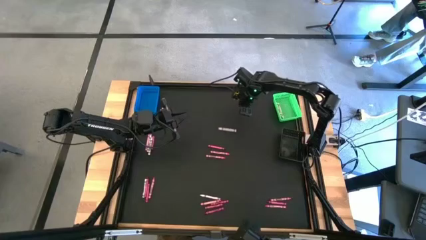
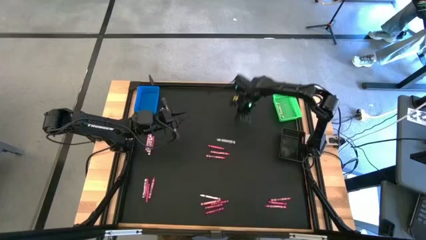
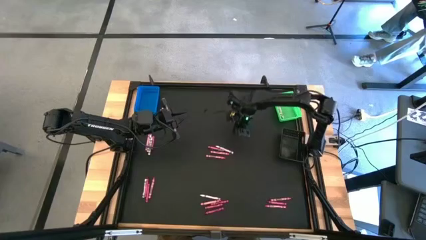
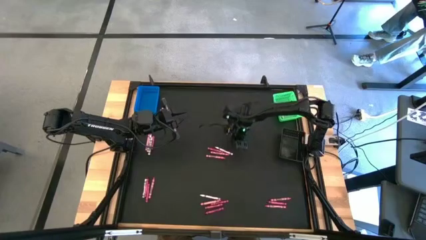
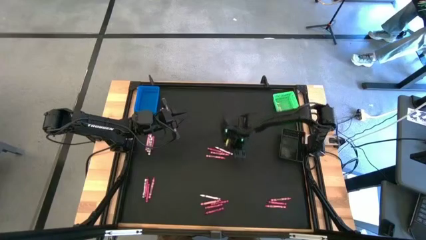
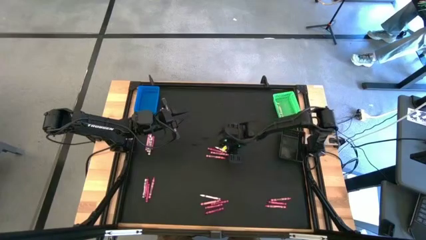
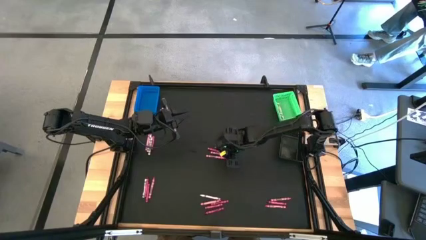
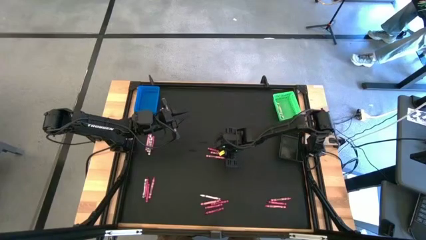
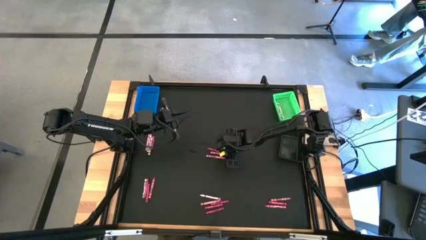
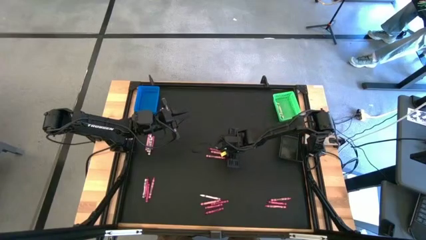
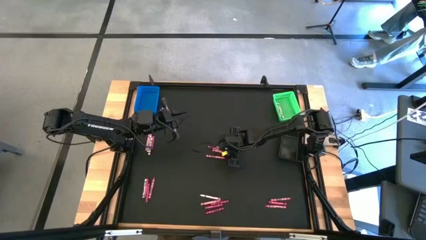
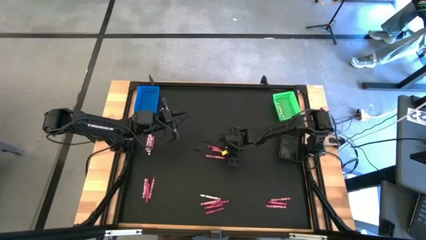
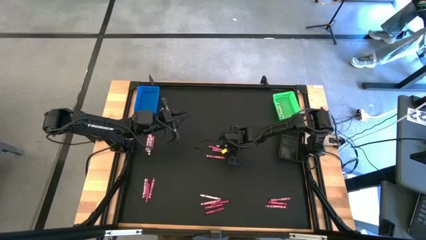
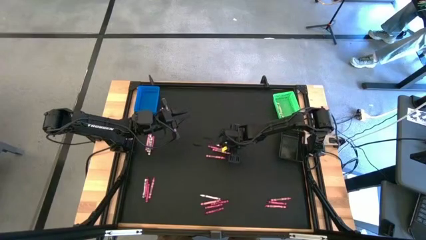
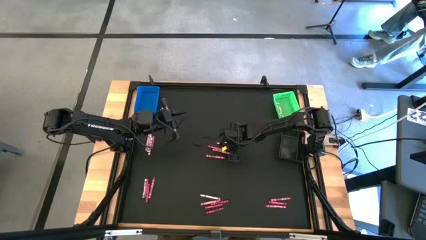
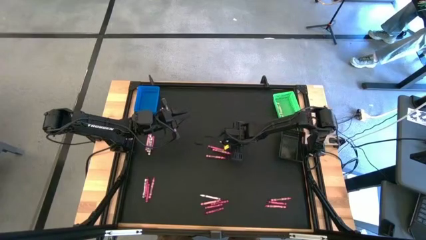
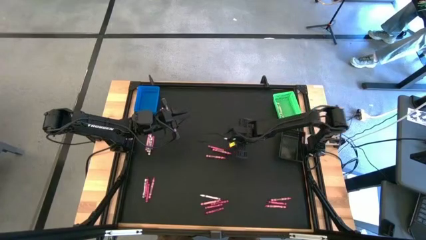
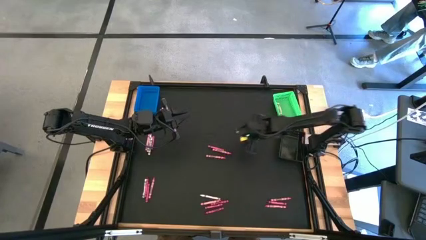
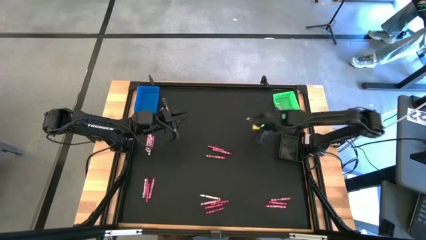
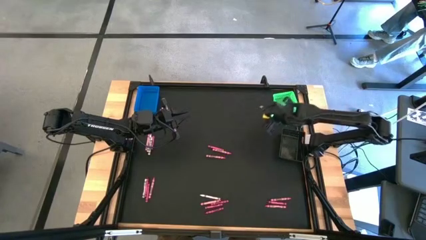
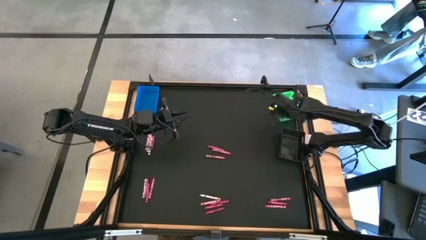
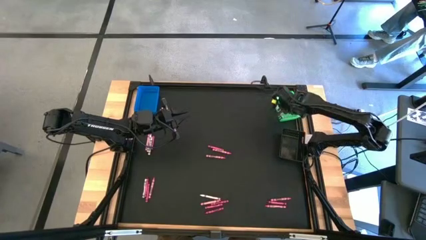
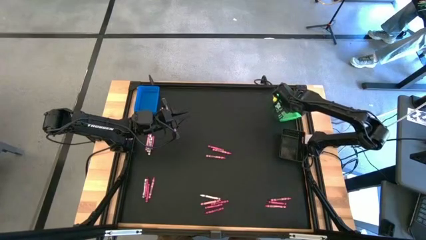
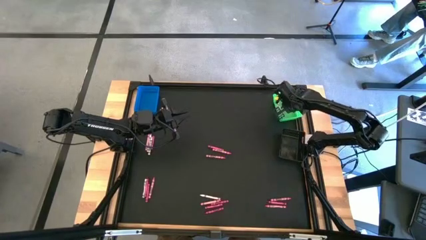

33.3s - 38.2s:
Task: Sort crayons
Put the white crayon into the green bin

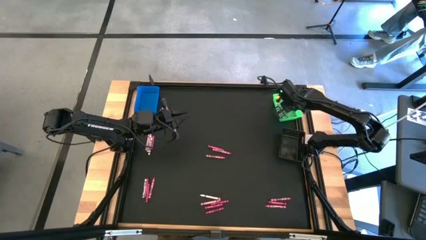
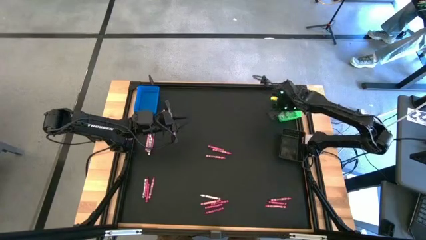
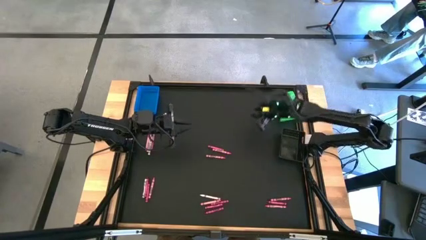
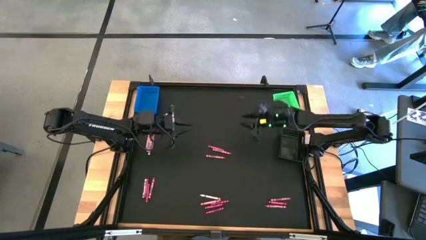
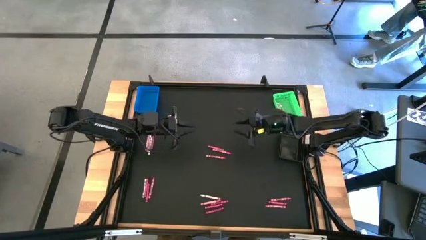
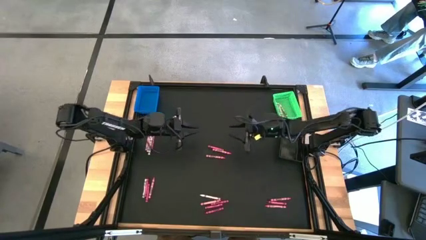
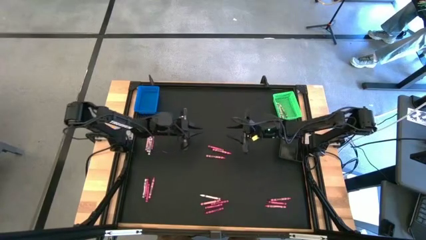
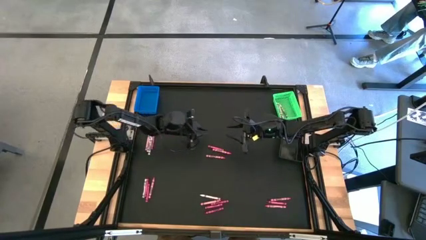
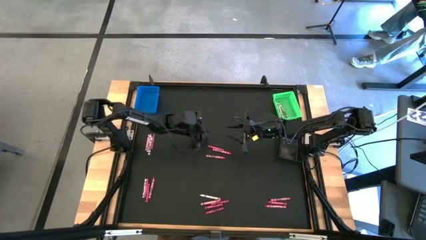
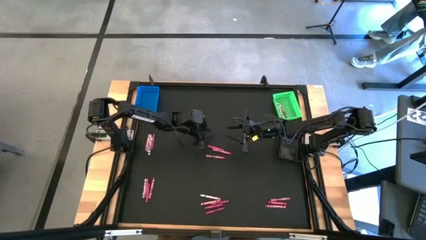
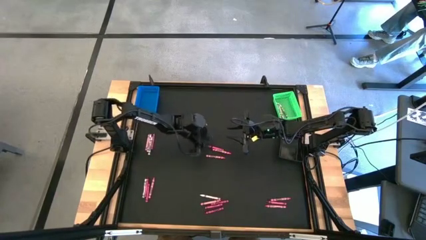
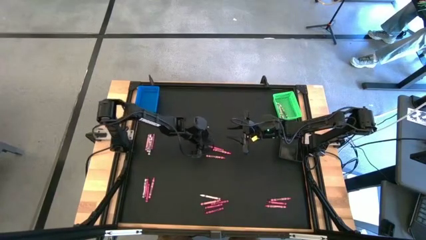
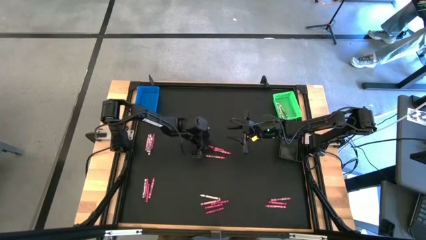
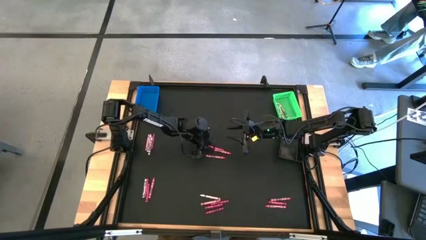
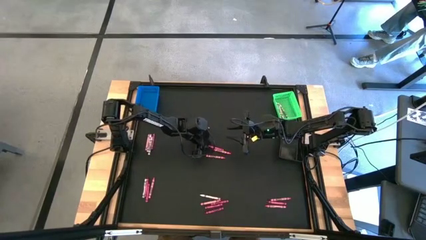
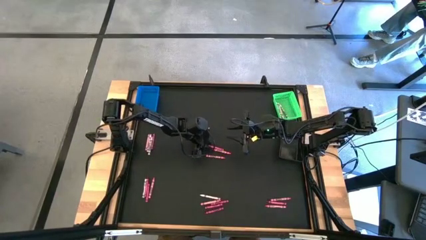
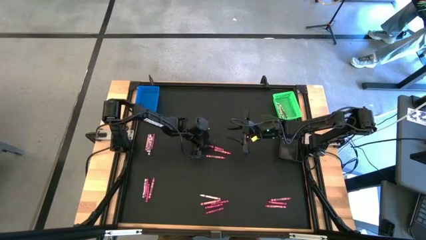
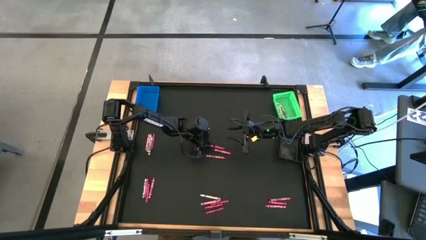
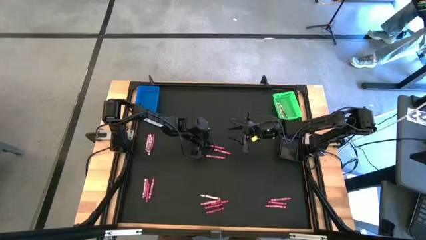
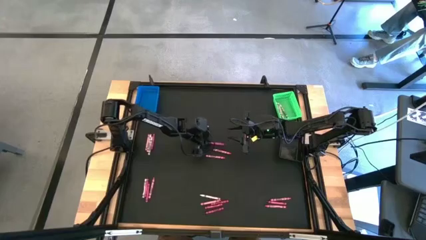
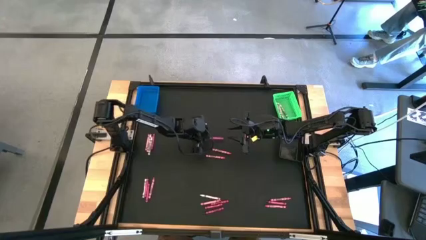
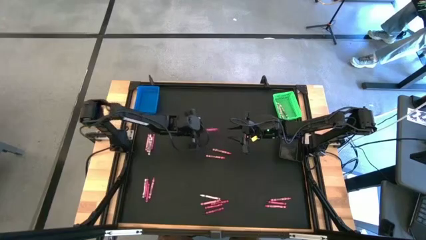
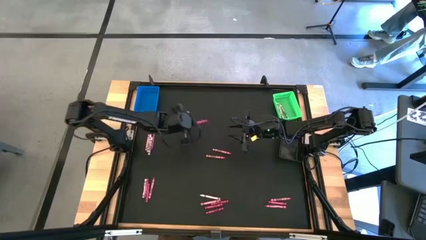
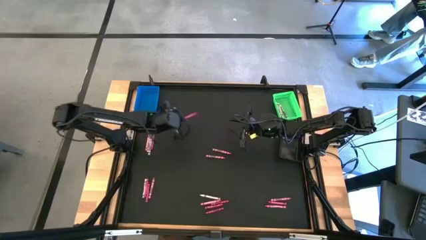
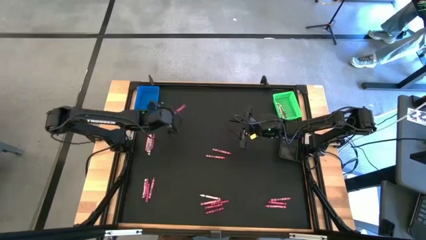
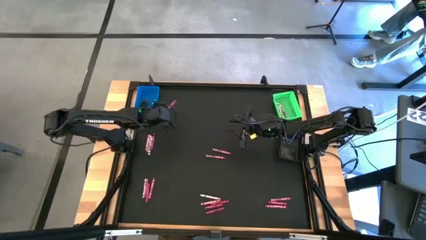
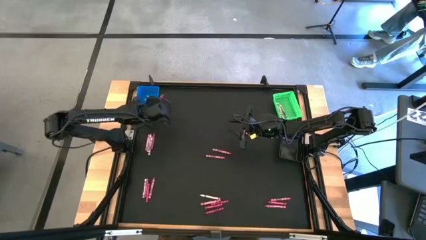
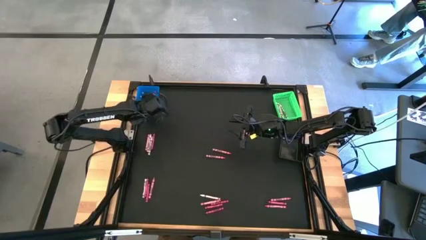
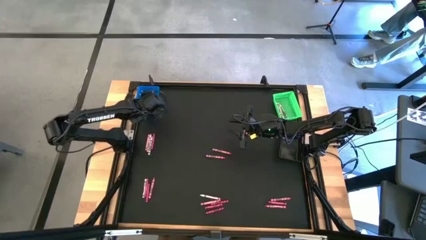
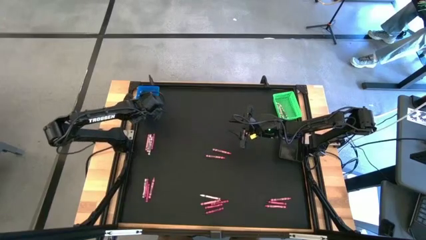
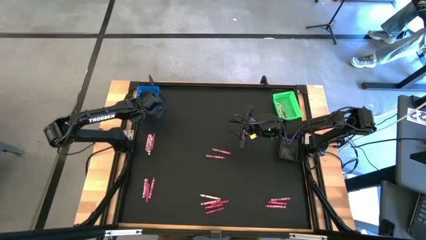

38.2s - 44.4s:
Put the red crayon into the blue bin

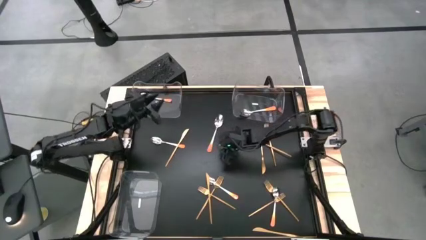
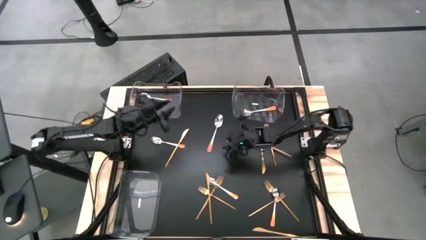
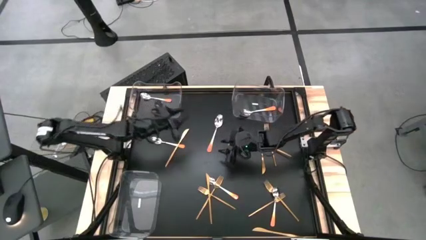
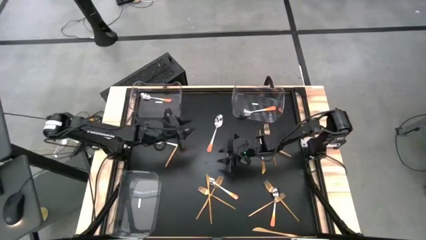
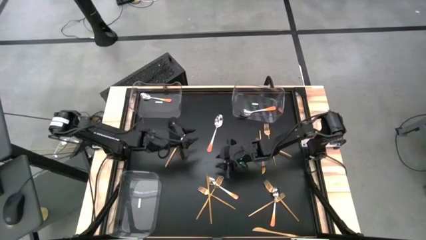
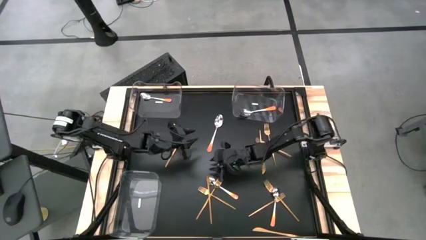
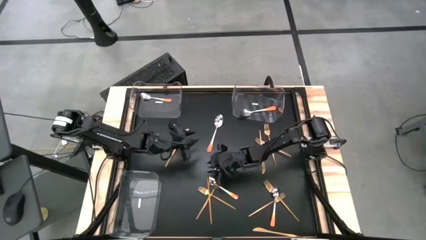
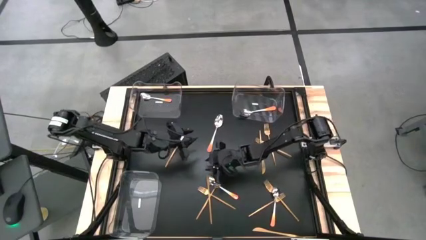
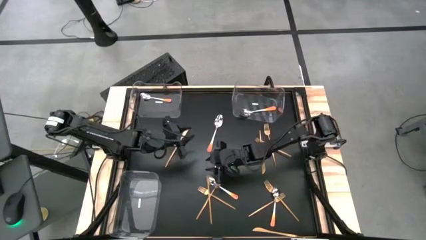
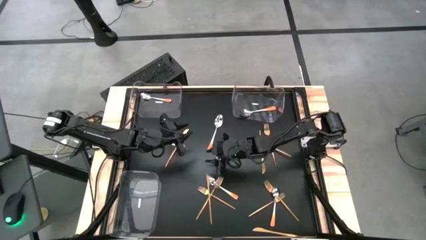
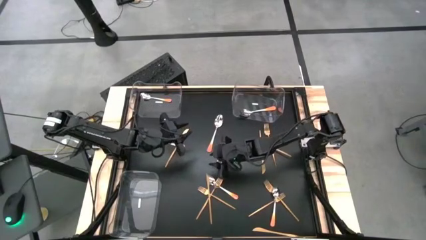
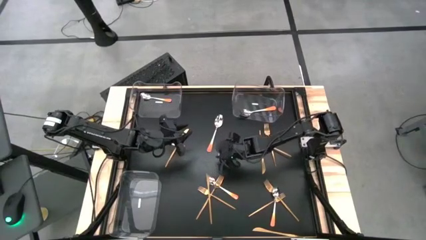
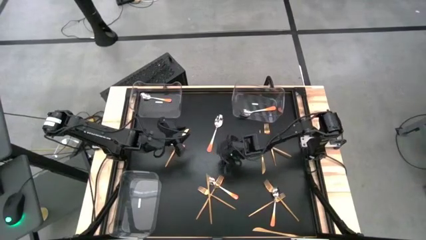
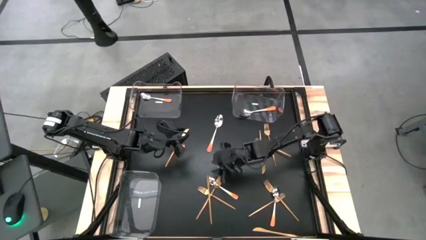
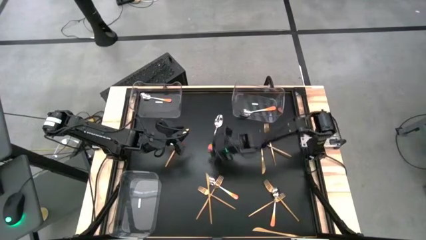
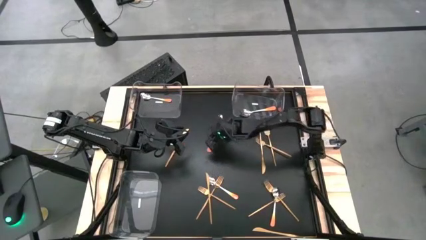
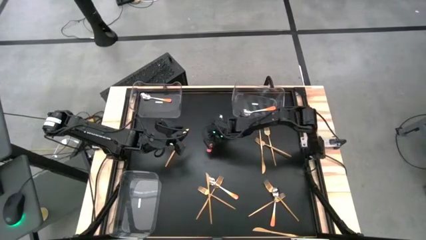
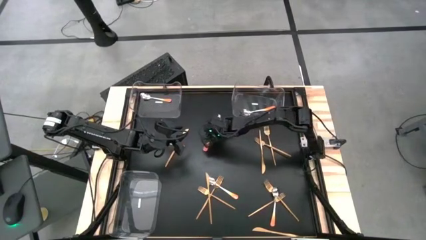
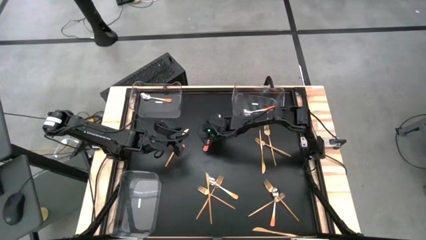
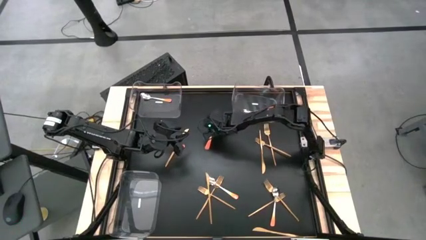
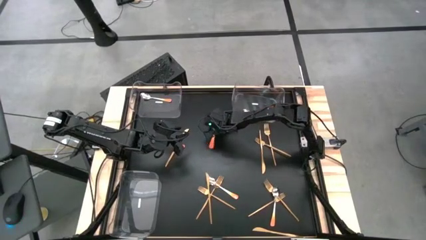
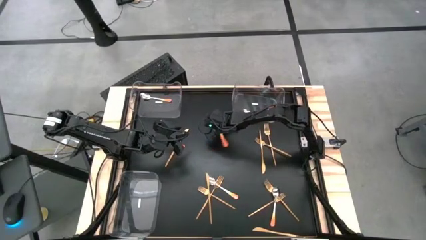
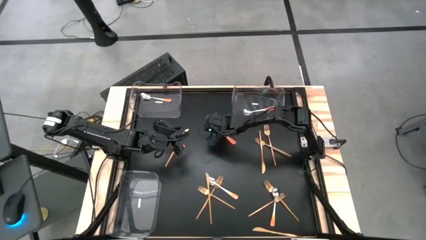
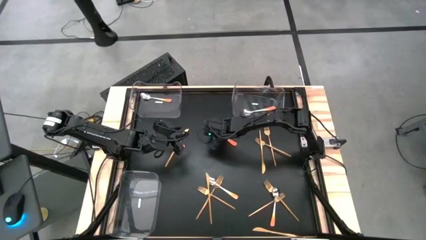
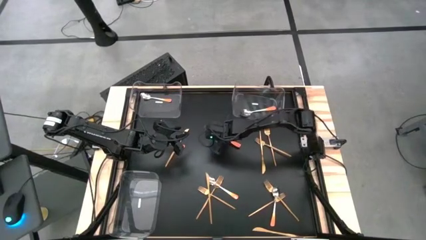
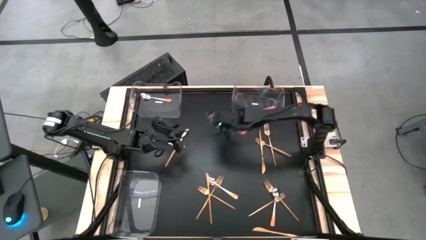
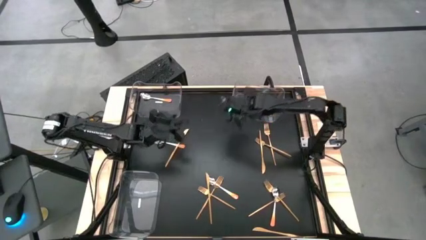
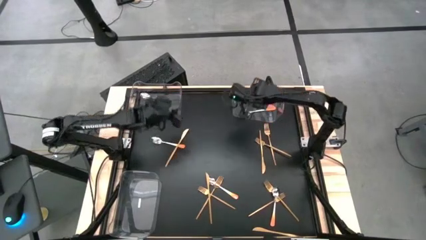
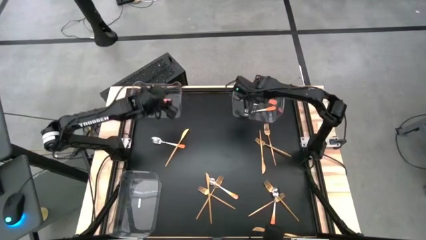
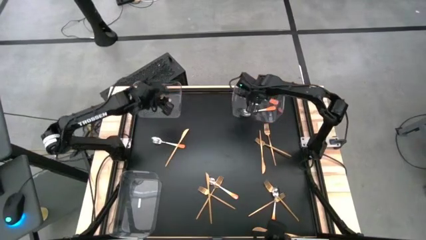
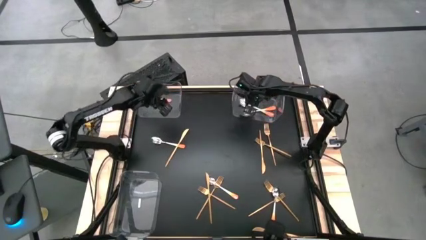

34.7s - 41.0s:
Task: Sort silverware by color (type)
Put the silver and orange spoon into the top right transparent bin
